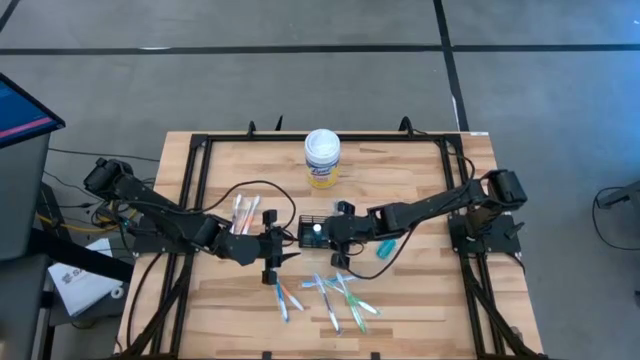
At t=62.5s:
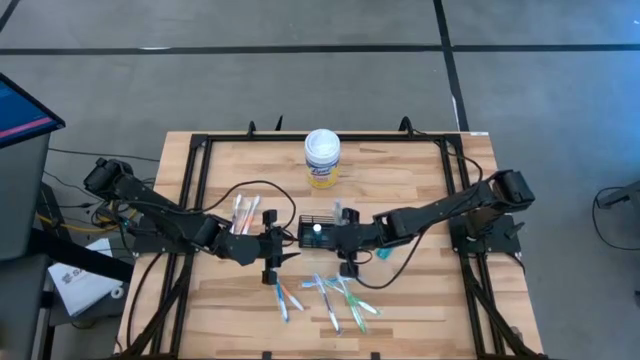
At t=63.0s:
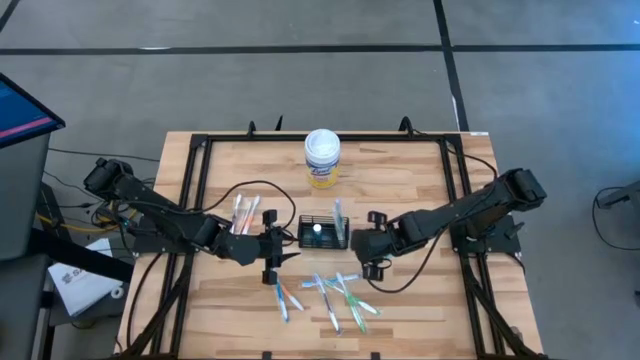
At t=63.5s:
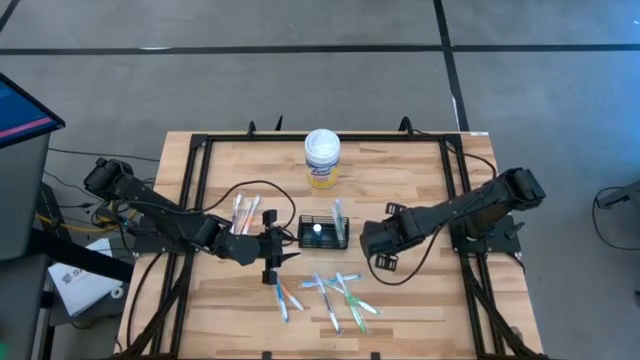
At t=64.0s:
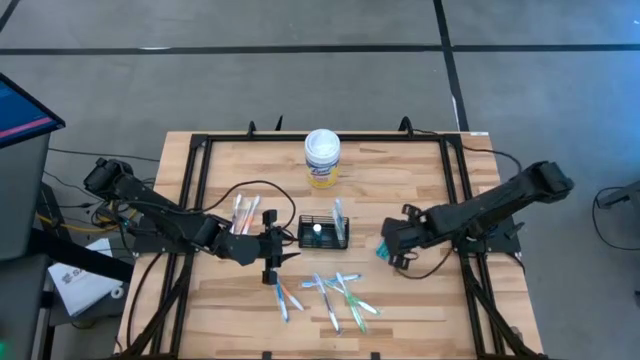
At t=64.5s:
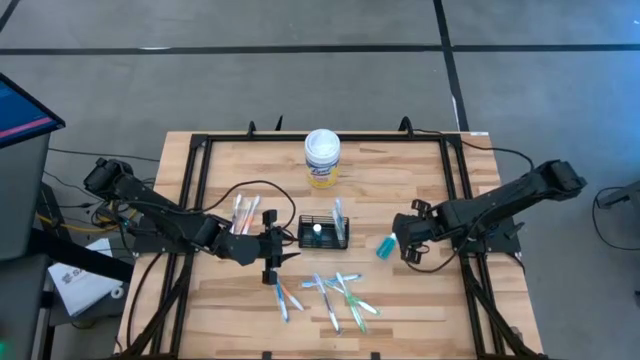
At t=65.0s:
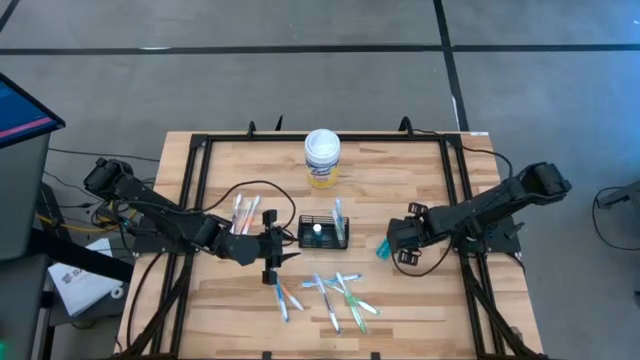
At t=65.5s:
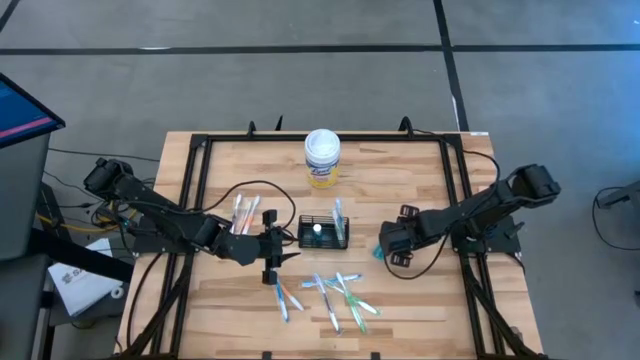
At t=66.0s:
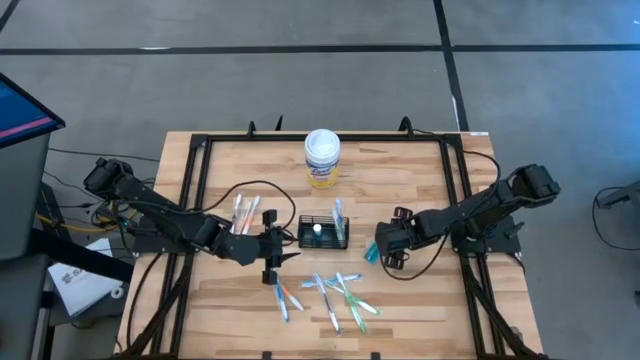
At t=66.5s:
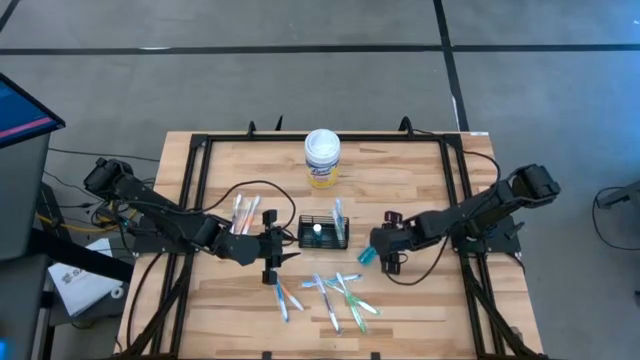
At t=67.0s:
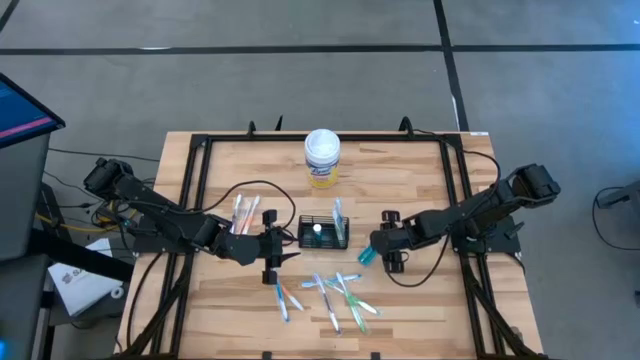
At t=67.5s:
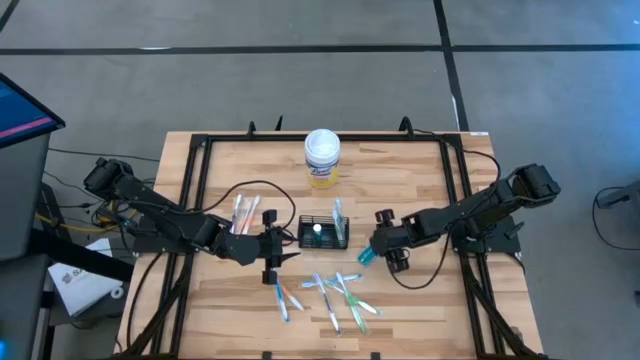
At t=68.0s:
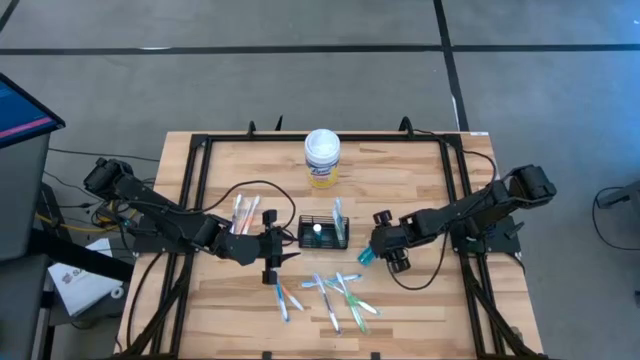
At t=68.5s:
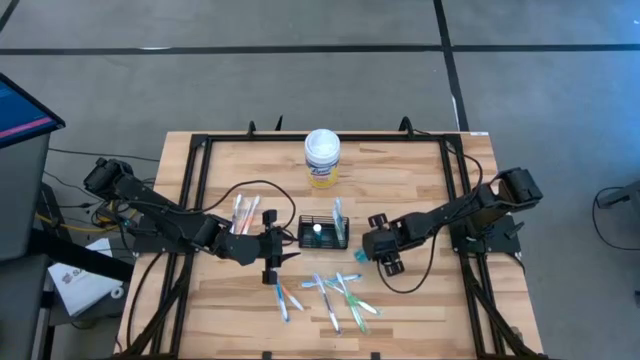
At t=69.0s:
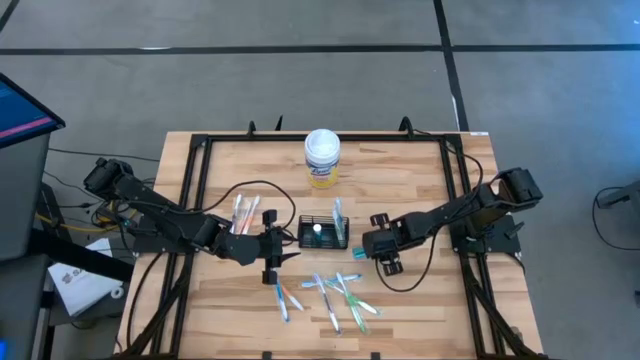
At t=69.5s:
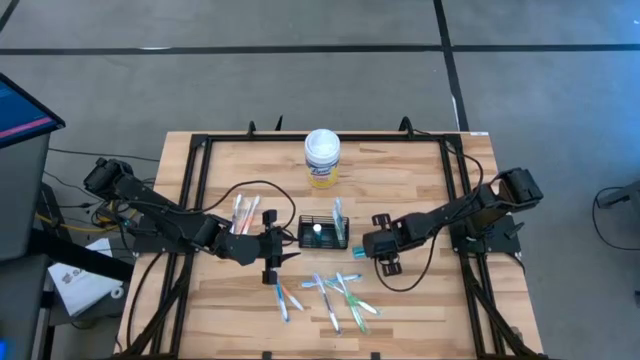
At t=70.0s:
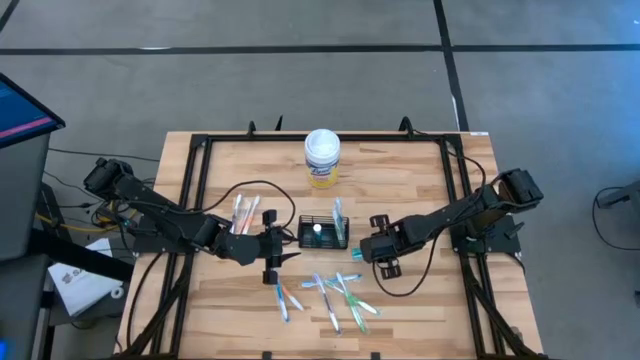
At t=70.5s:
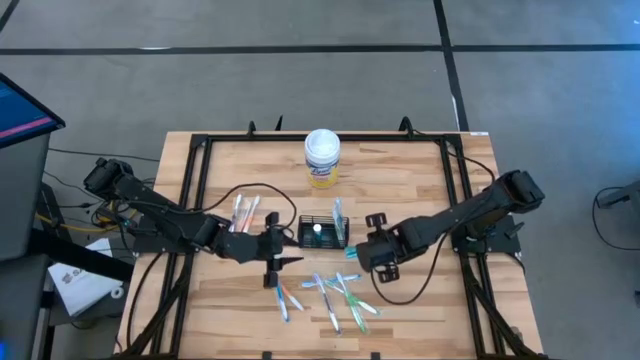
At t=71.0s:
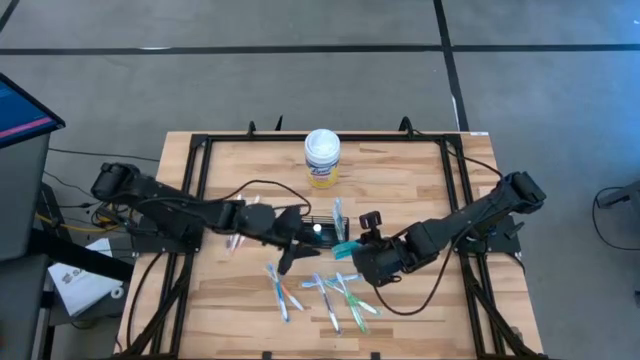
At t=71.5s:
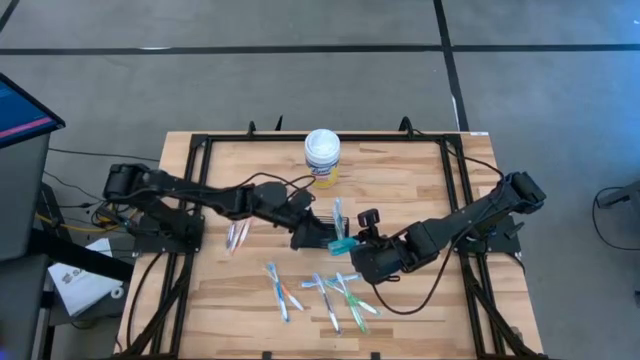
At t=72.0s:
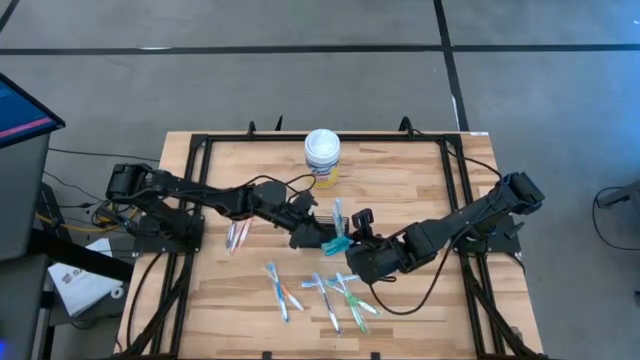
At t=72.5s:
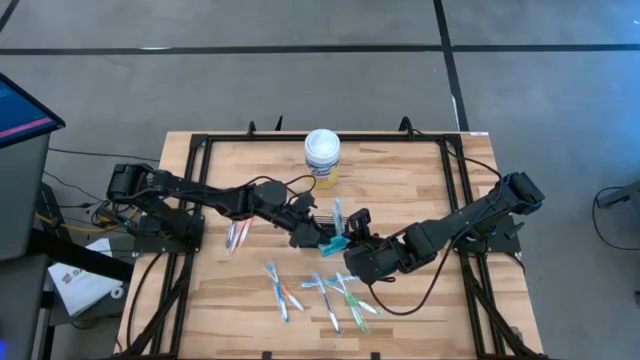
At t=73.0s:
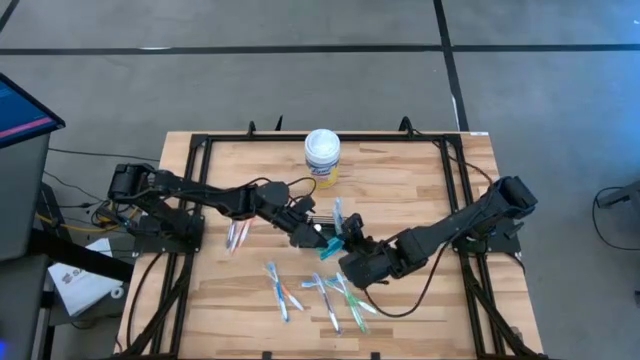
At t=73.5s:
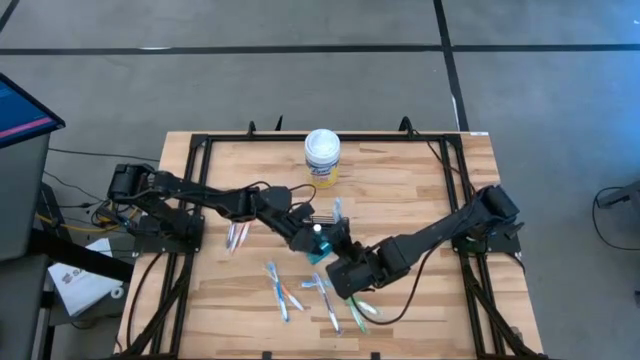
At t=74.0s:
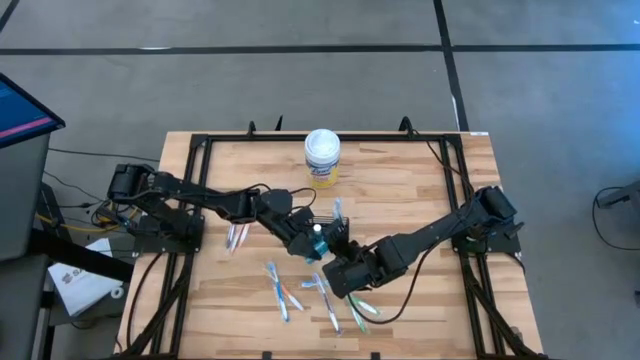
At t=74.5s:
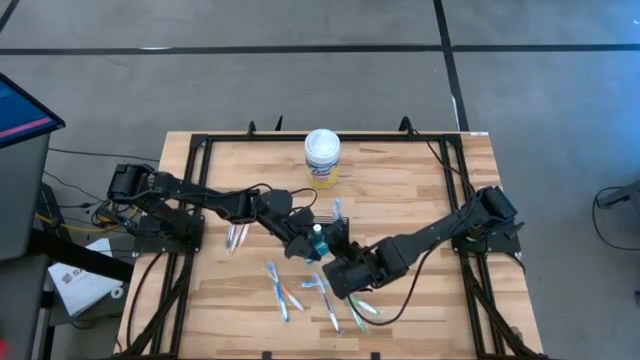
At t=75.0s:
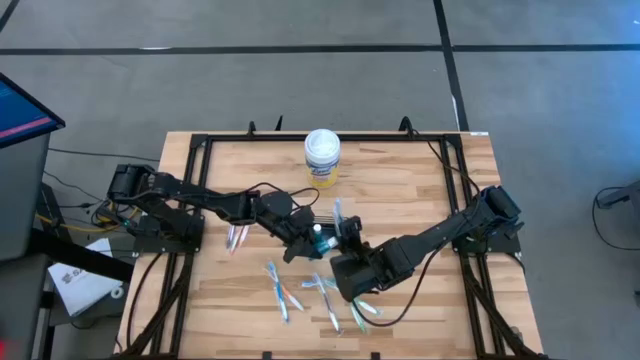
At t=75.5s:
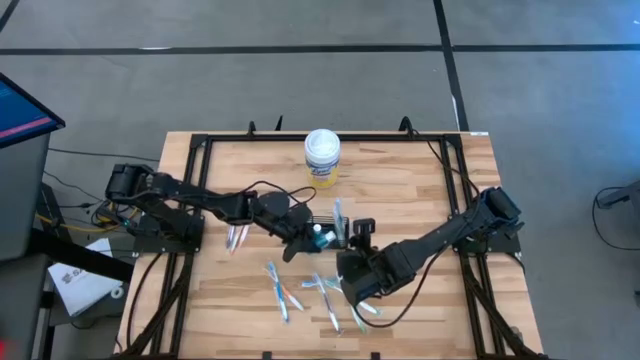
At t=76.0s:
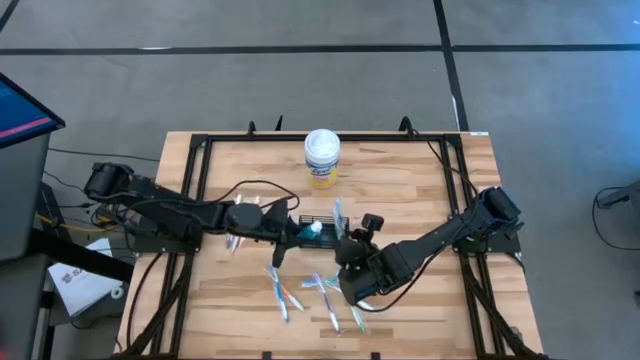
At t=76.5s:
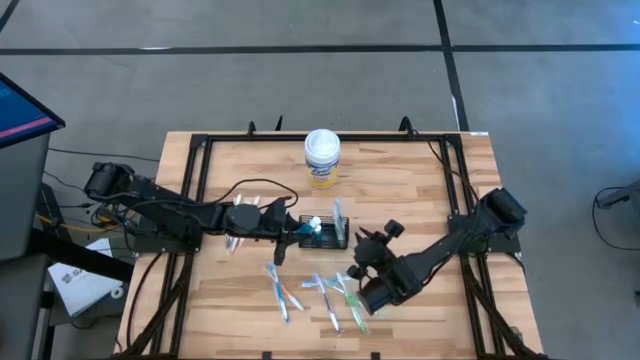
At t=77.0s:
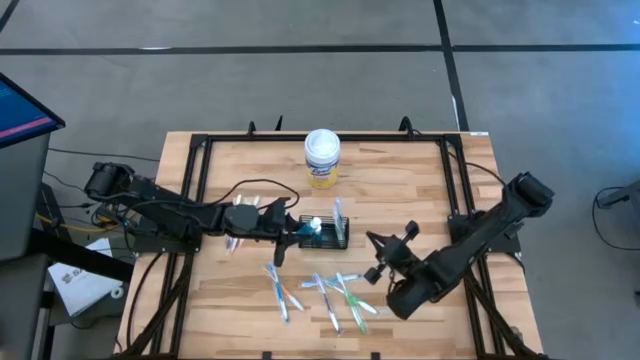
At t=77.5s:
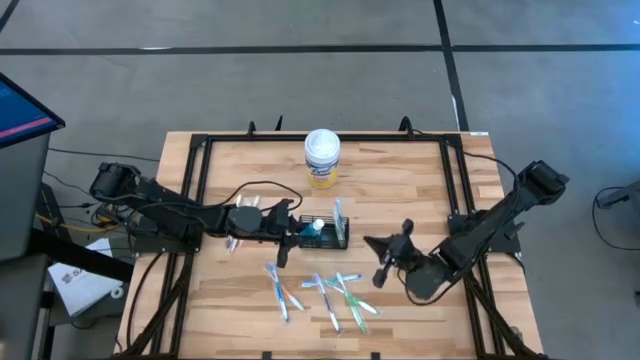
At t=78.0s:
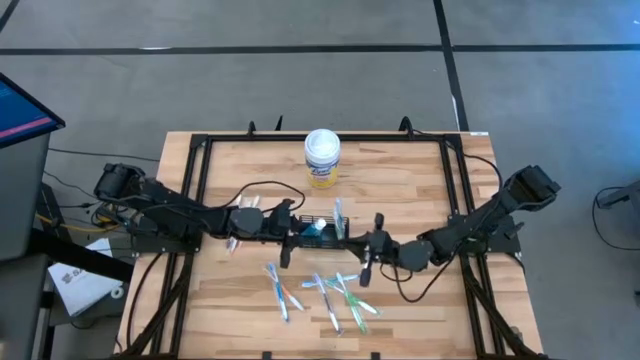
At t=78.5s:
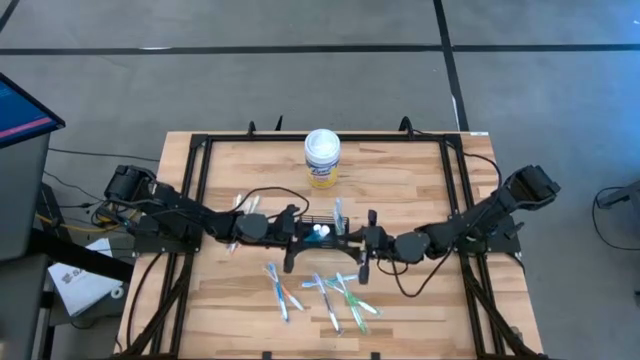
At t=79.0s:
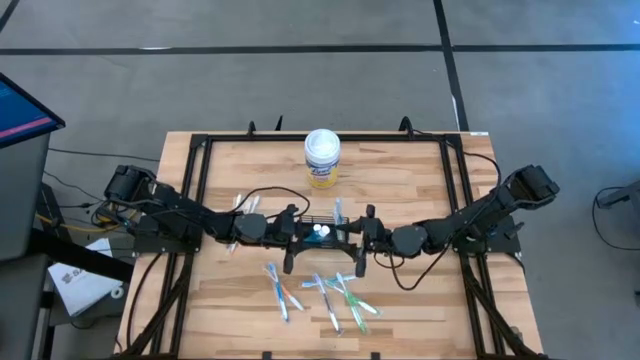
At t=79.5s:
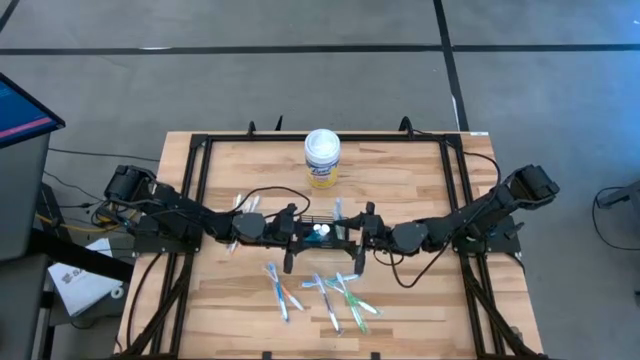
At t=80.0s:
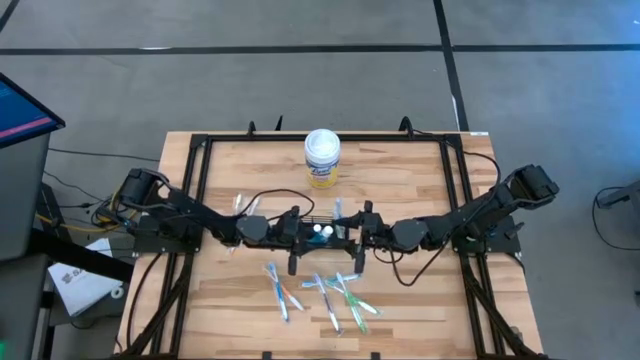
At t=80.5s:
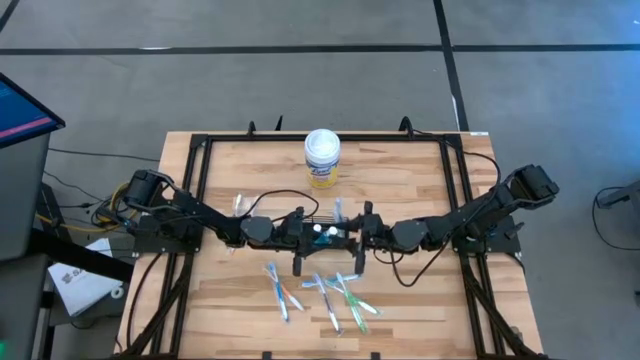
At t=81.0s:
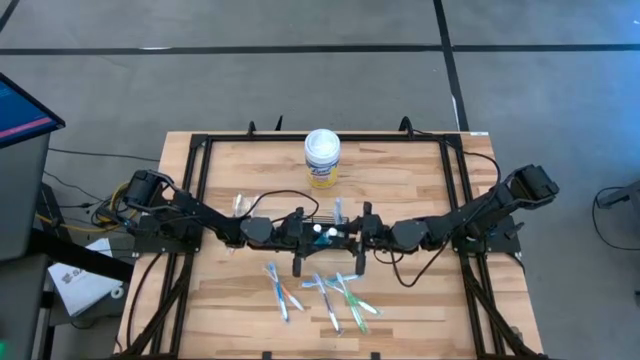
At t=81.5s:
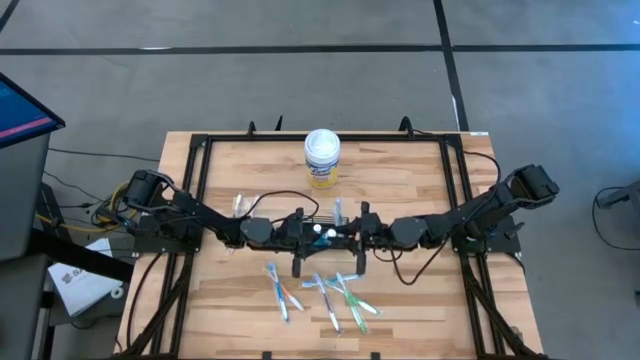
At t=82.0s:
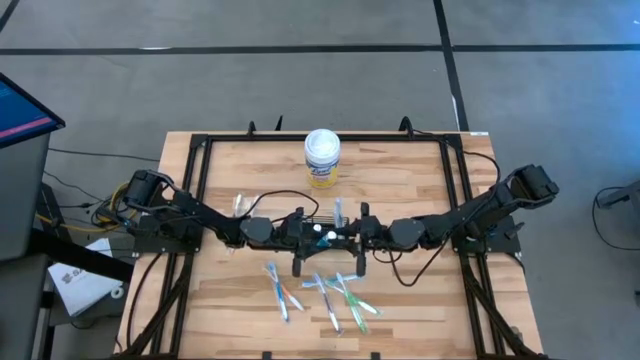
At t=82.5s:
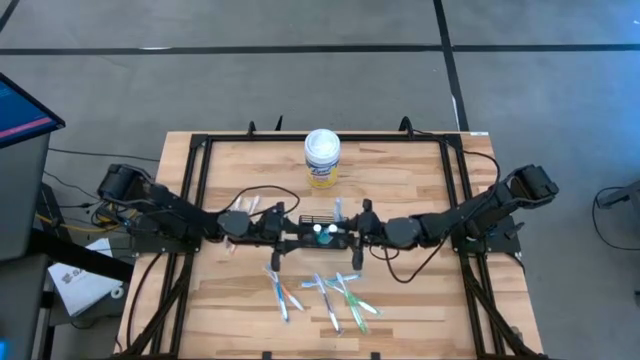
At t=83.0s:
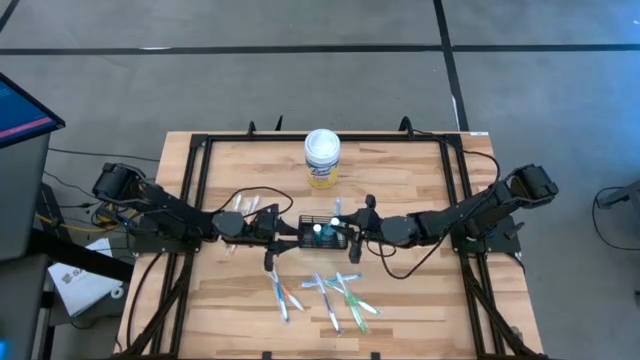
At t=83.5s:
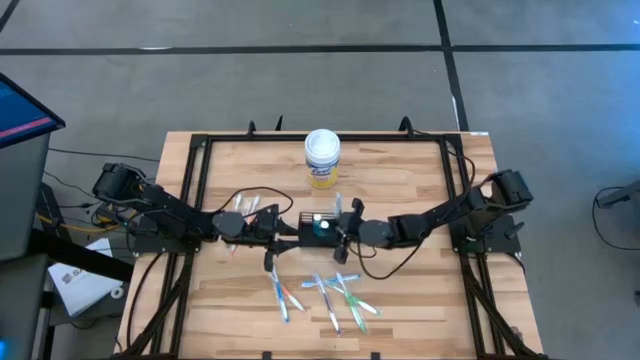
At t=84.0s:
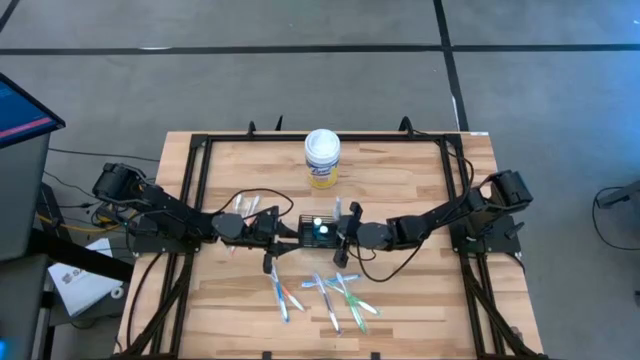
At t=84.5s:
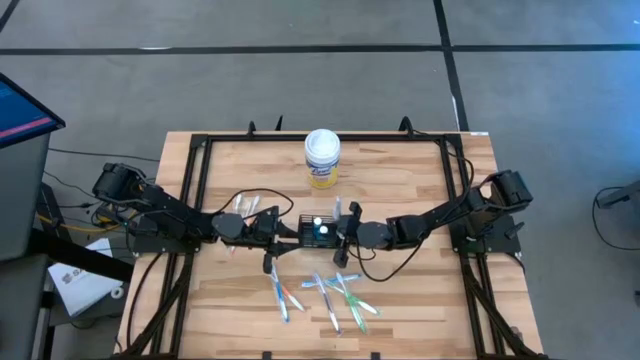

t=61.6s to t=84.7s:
Task: Pick & Place toothbrushing station
Put the blue mouthwash into the black mesh organizer
